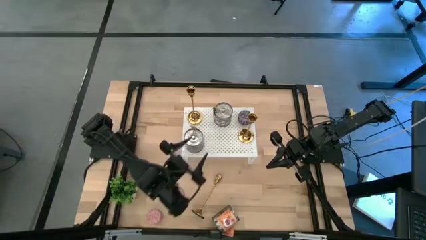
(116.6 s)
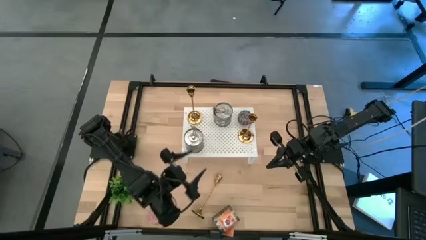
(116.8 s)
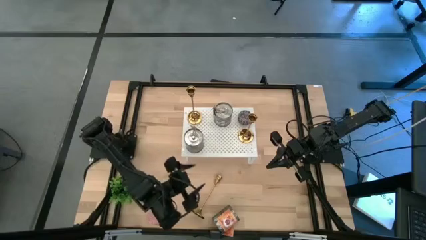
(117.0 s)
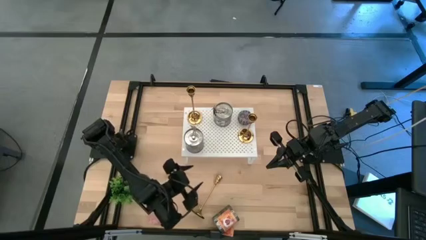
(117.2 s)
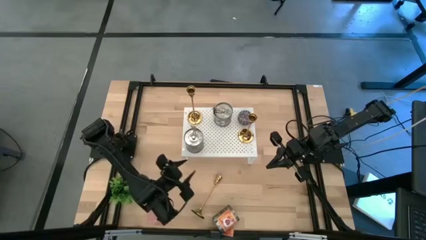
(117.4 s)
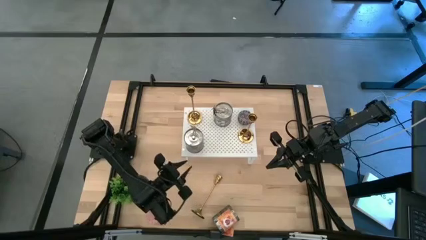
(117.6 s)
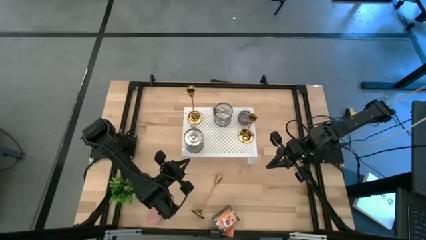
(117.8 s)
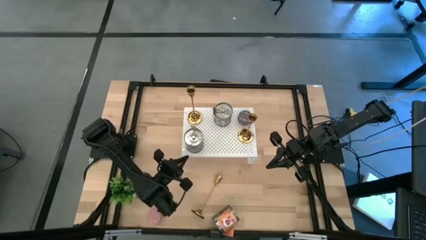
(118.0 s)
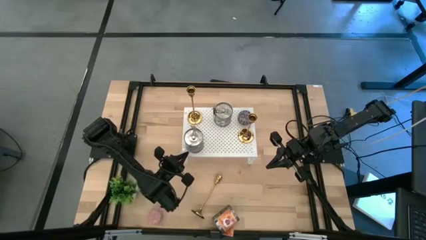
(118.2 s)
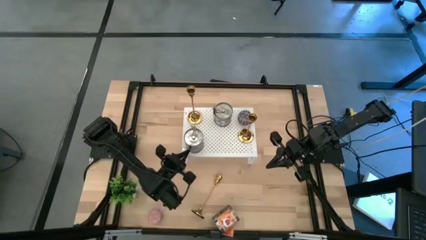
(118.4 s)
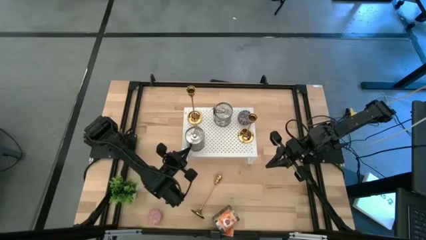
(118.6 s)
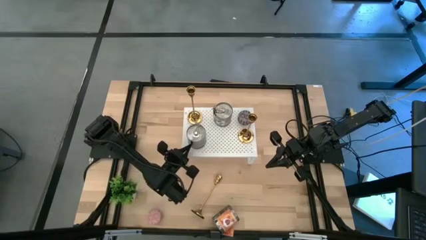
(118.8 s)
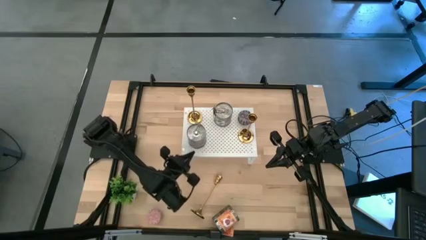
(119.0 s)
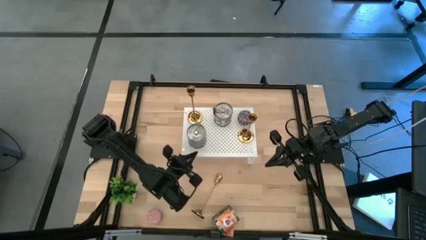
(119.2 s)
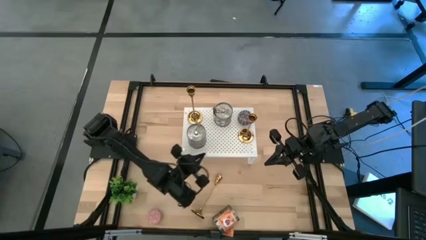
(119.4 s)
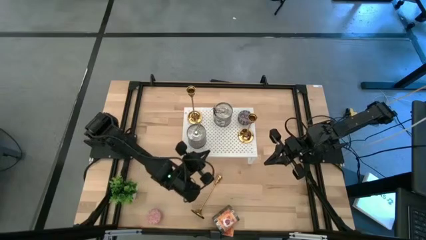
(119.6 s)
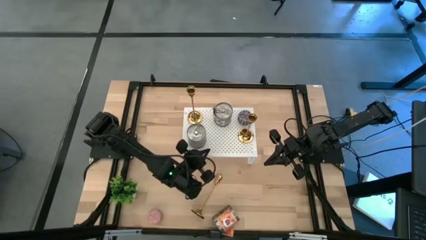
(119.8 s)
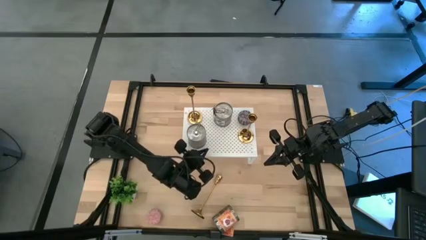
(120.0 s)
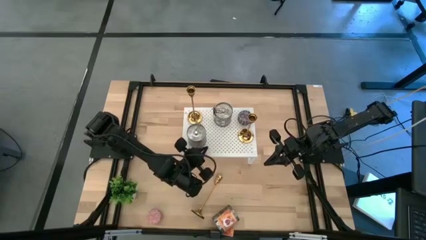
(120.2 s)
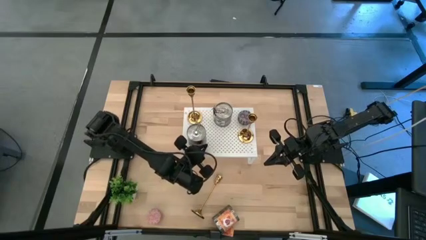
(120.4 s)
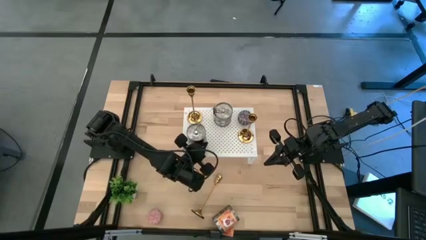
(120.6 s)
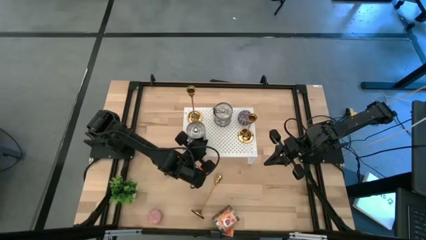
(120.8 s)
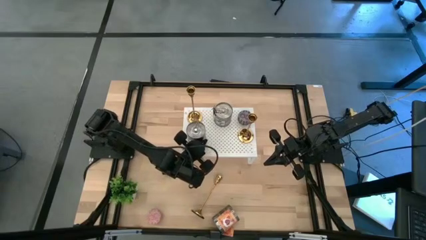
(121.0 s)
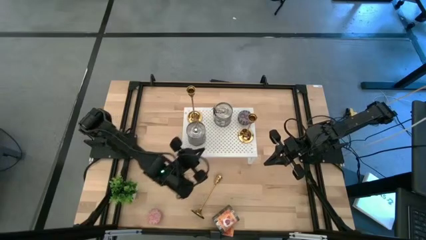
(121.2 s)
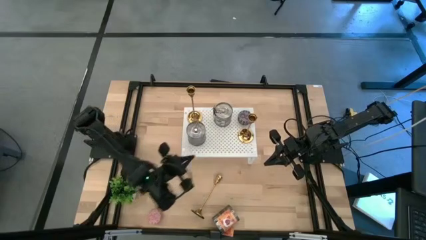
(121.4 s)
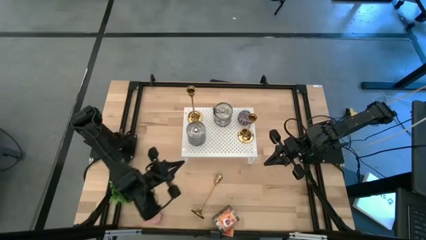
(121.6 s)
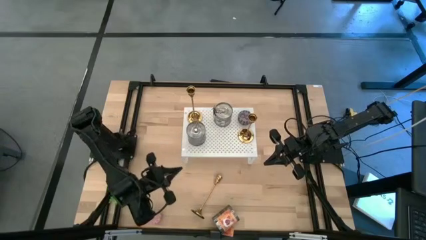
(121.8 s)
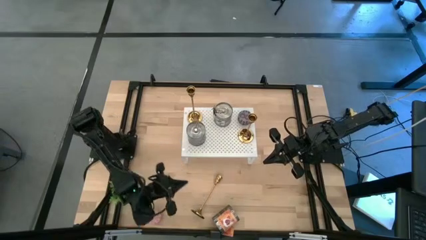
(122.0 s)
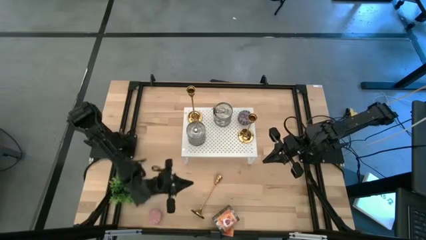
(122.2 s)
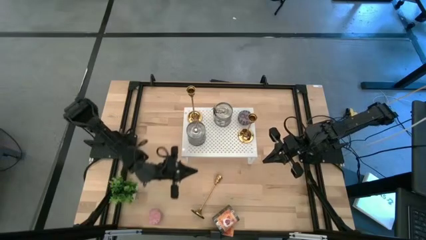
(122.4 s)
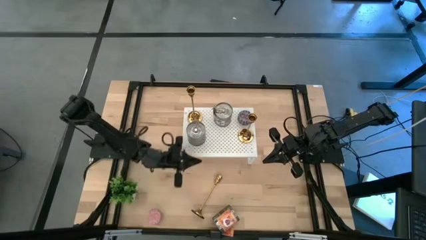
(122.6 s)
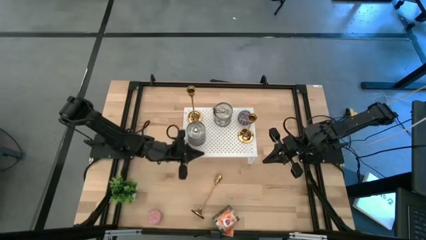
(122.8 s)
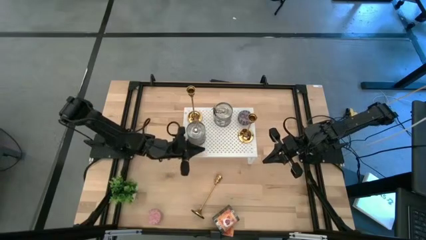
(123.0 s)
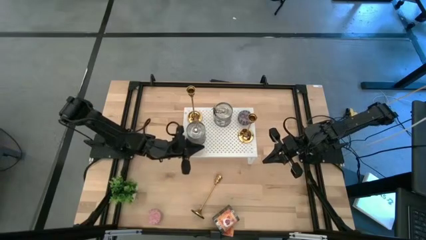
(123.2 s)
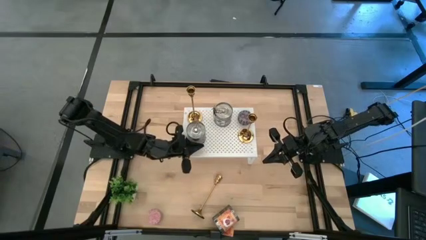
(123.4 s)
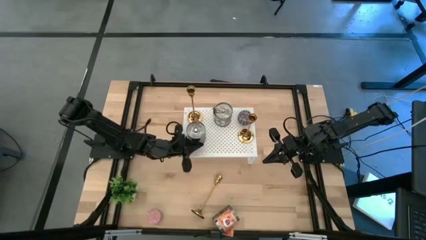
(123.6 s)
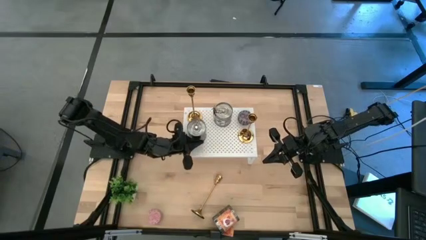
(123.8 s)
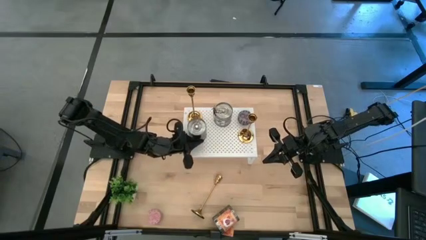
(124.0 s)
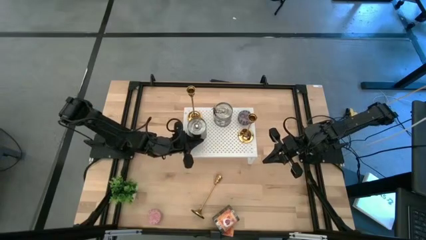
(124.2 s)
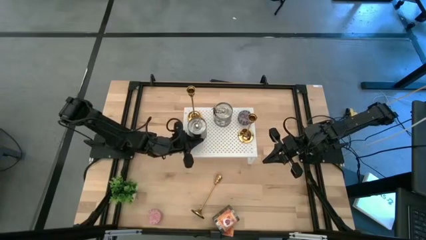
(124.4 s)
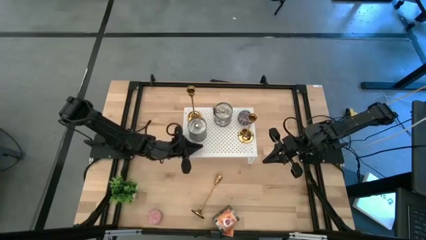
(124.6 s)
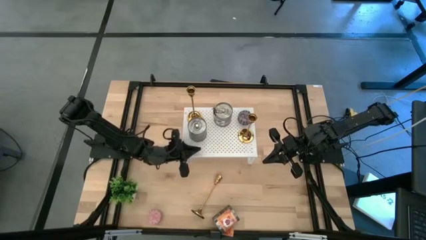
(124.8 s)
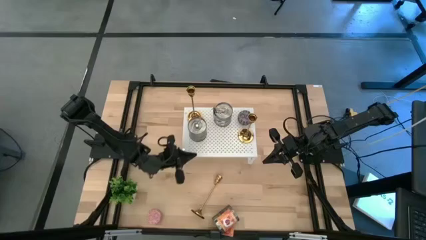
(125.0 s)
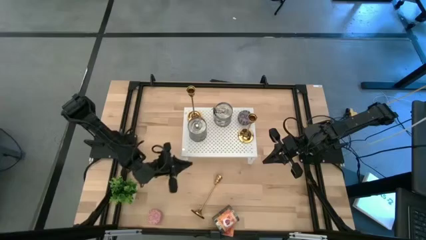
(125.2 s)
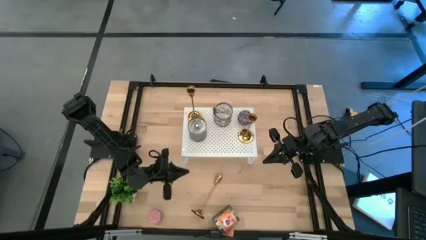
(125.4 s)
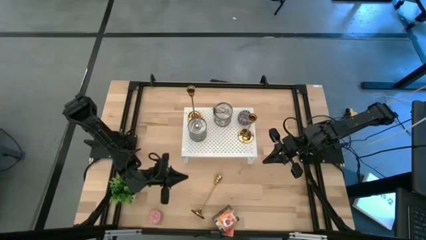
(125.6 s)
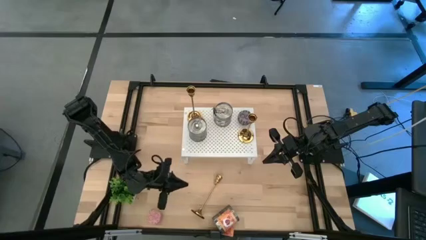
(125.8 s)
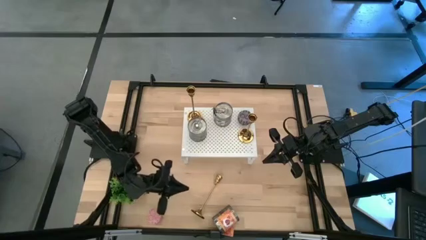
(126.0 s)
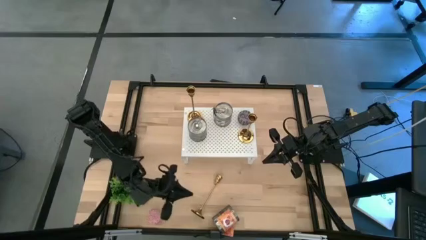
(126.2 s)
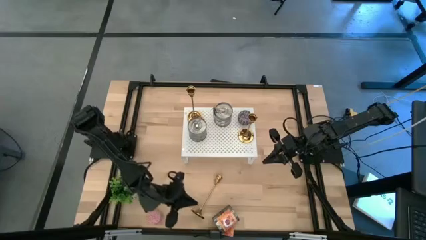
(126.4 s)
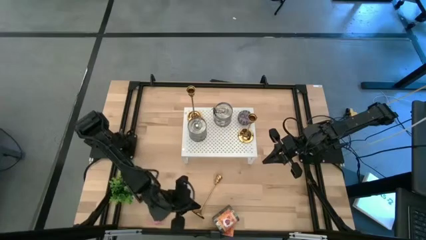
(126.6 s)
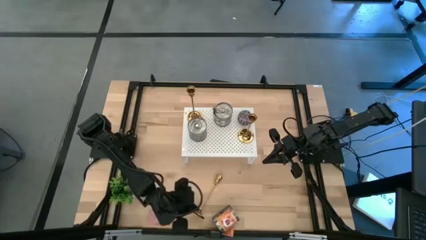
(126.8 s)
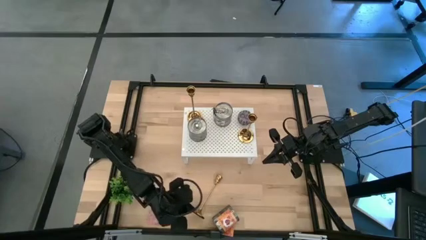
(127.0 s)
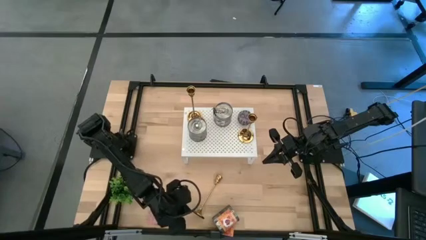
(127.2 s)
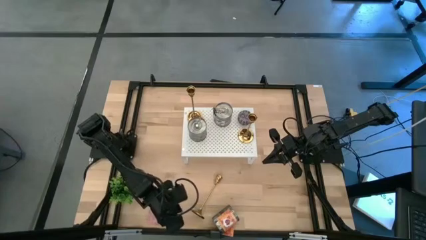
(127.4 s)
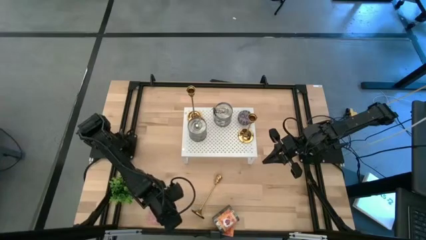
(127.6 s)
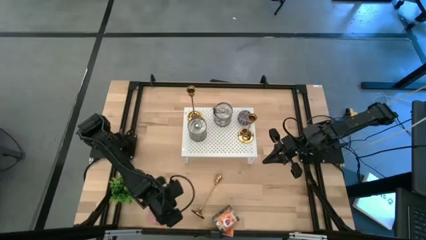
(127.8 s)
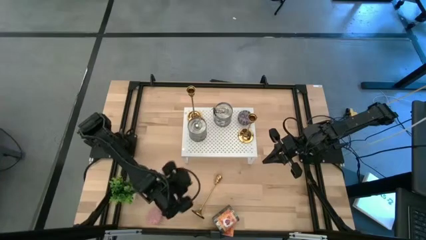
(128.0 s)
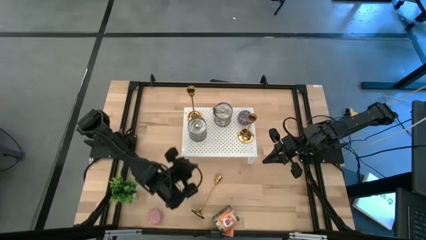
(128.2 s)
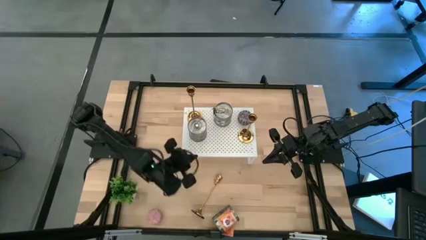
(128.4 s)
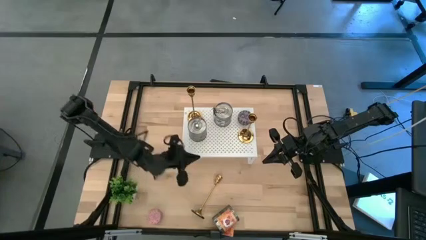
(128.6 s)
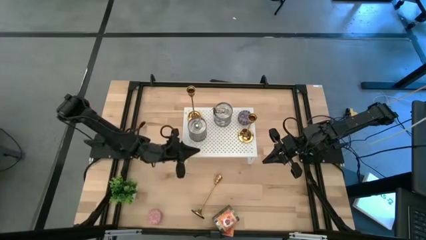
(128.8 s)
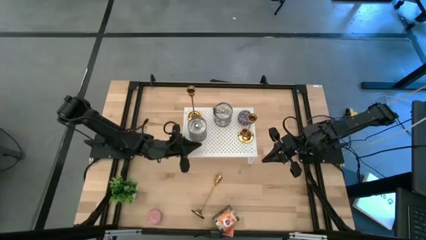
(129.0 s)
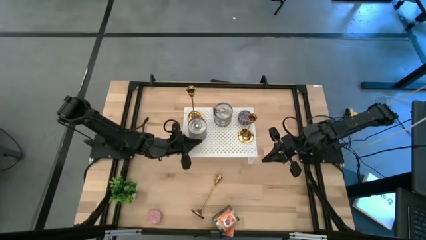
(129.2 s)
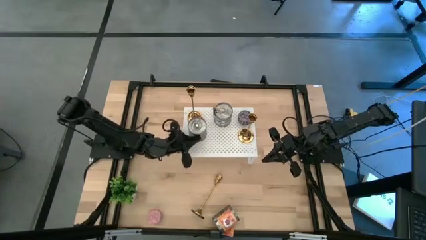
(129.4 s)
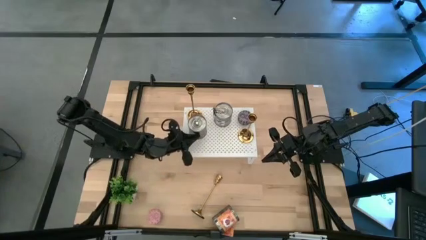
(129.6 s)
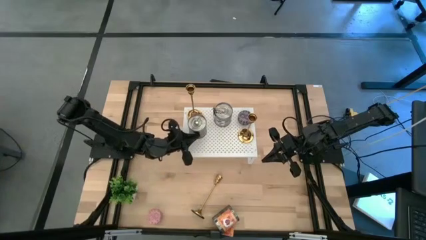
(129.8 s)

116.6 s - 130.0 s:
Task: Pick & Place candle stick holders
Put the left big silver scented candle on the shelf

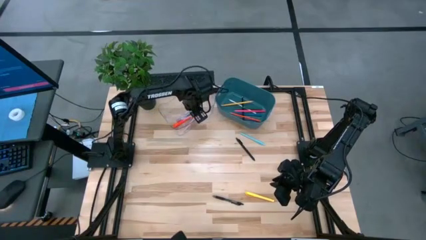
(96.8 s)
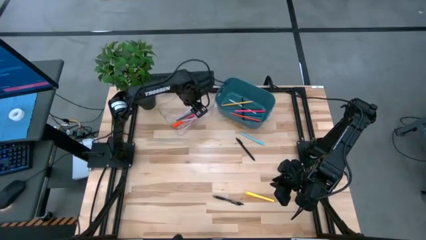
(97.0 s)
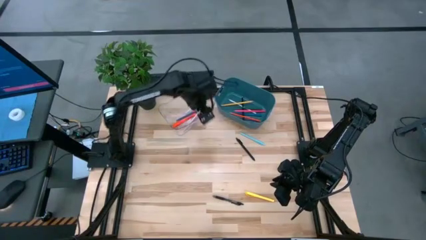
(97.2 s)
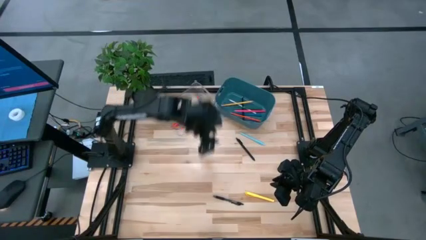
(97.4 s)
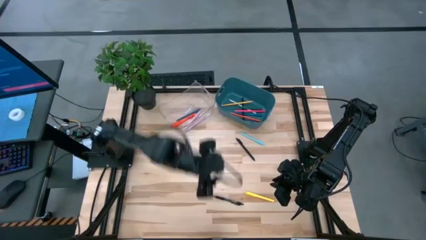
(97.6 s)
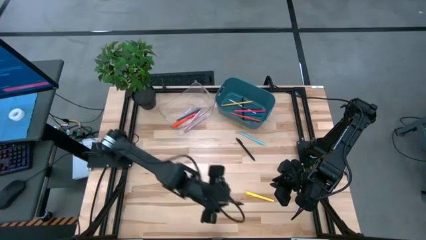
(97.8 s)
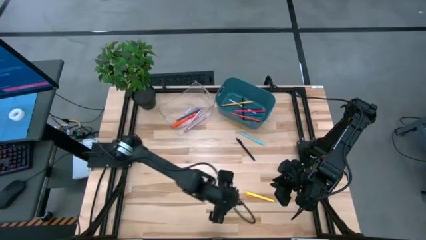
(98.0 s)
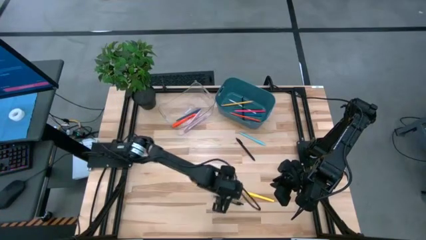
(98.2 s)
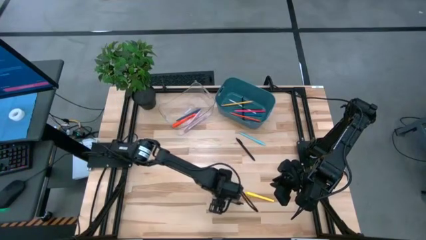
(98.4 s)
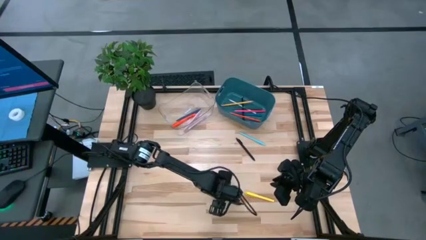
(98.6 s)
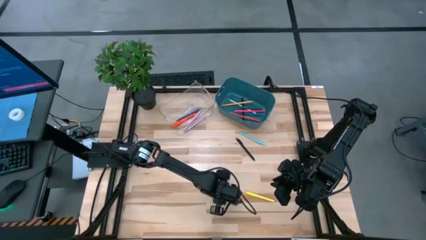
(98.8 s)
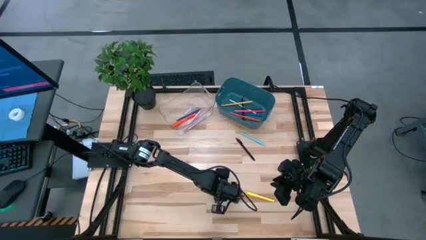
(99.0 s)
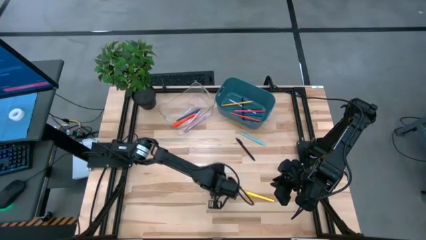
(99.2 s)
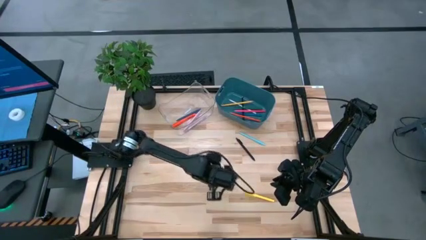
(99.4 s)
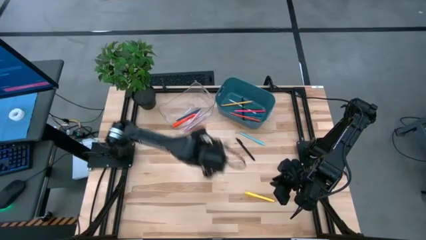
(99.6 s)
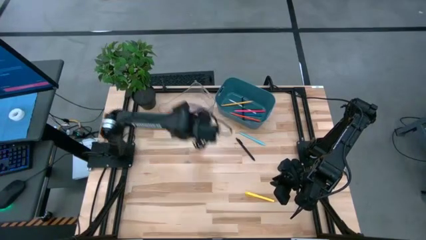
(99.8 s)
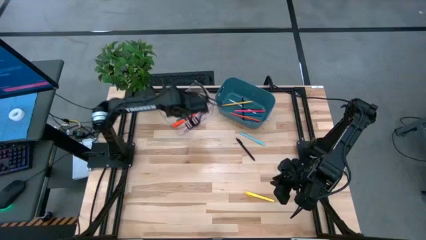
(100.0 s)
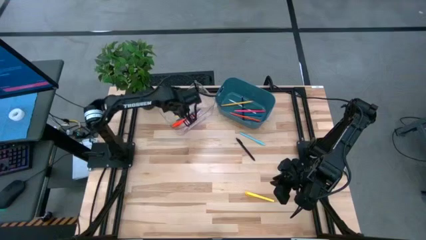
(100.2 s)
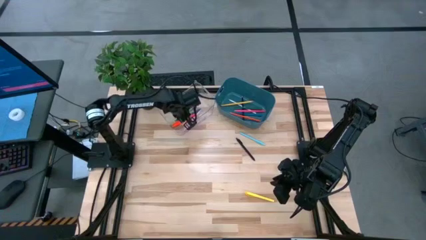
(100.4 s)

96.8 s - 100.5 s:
Task: Sort pens & pencils
Put the bottom black pen into the transparent bin
